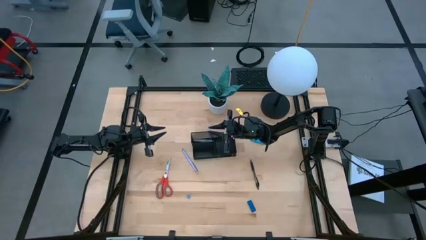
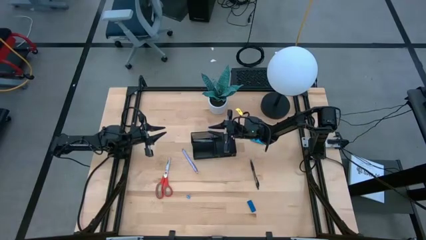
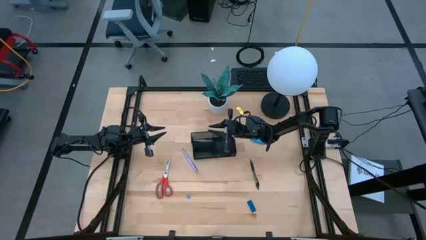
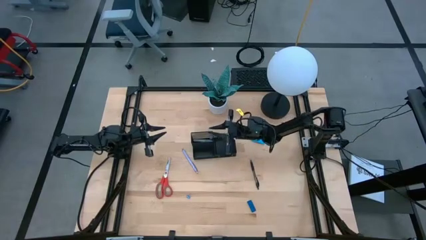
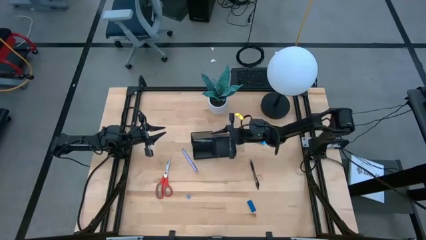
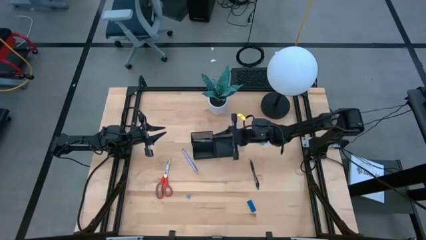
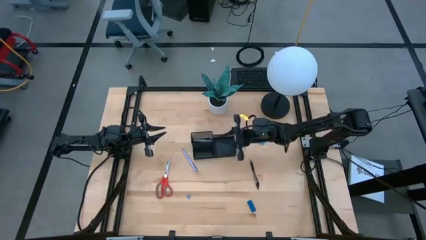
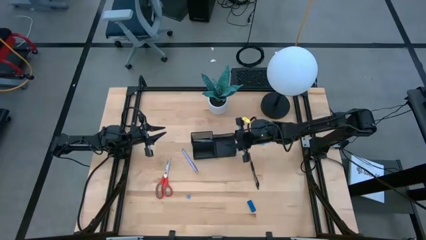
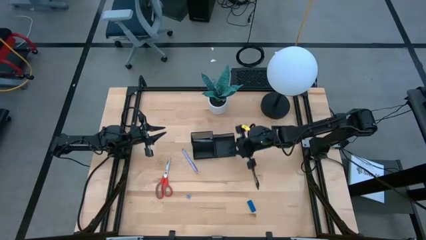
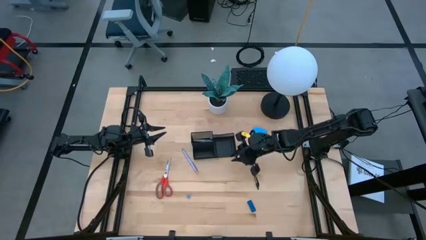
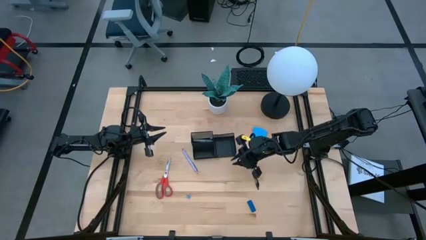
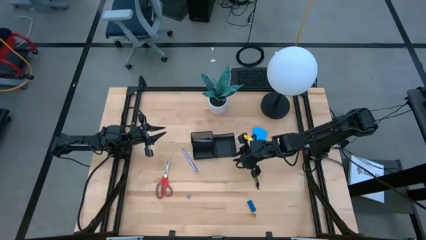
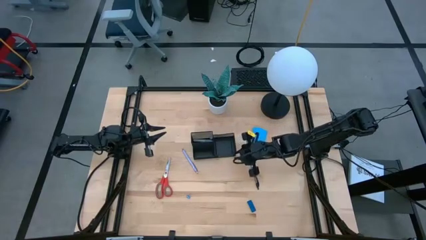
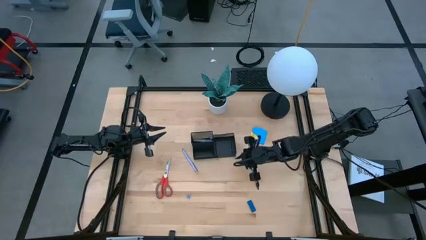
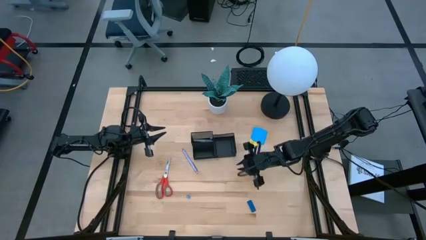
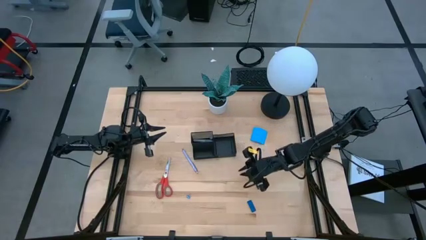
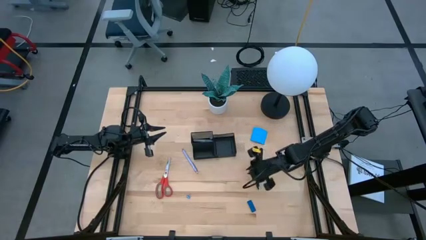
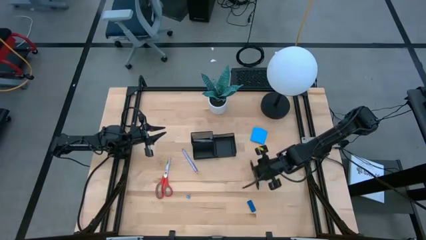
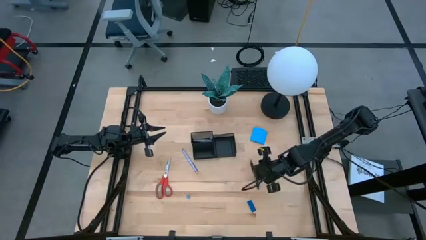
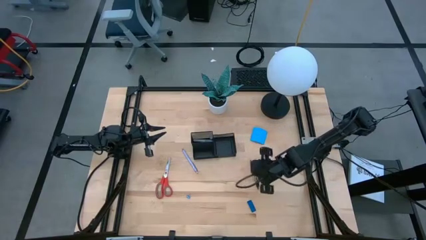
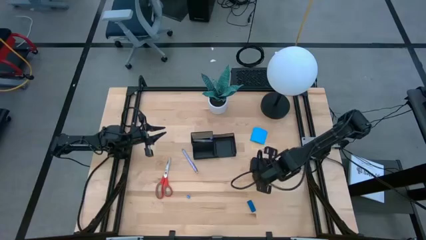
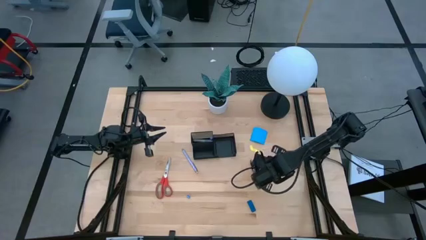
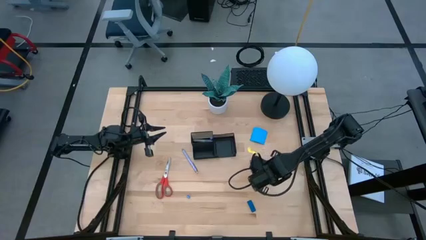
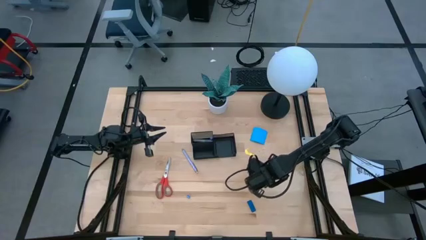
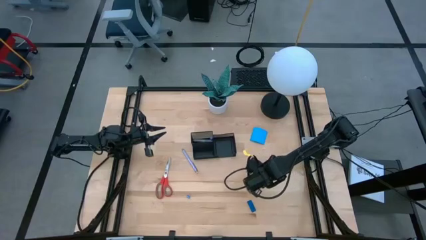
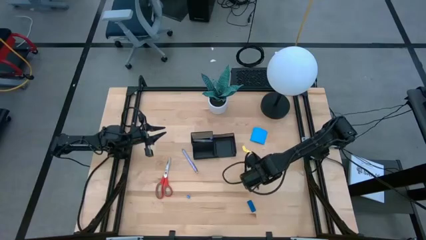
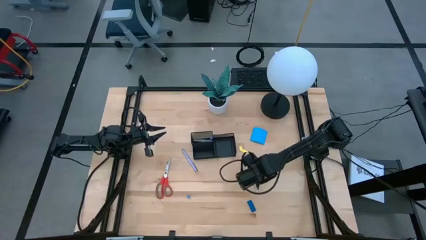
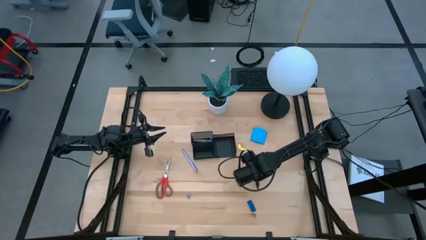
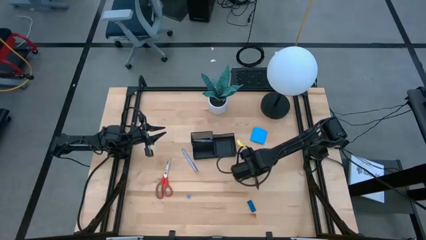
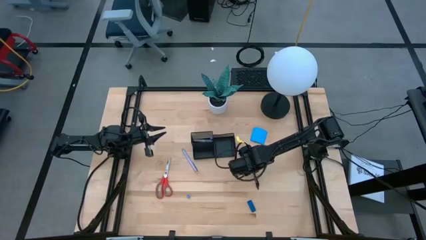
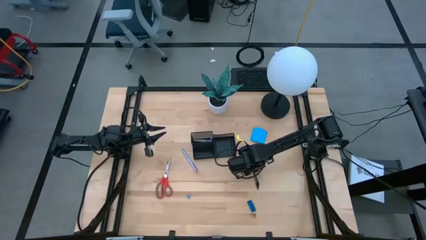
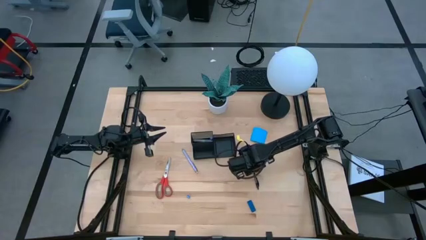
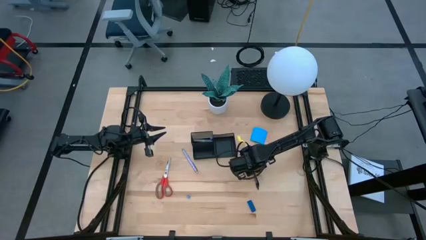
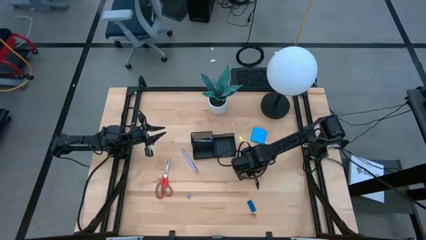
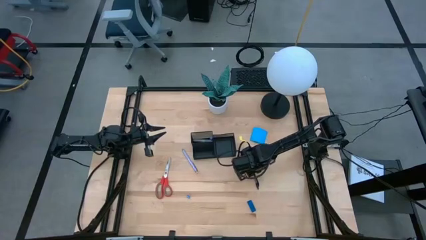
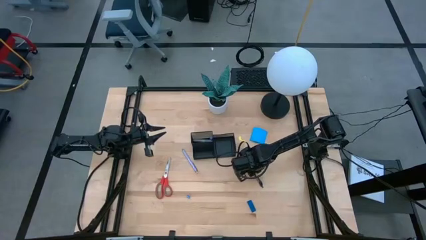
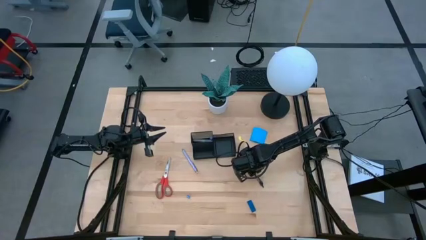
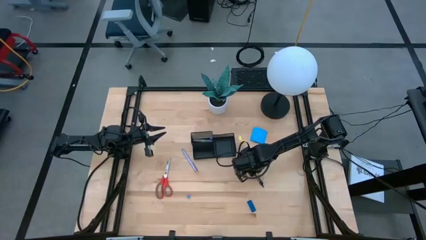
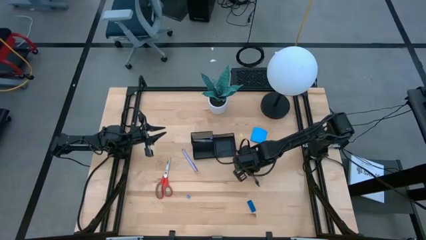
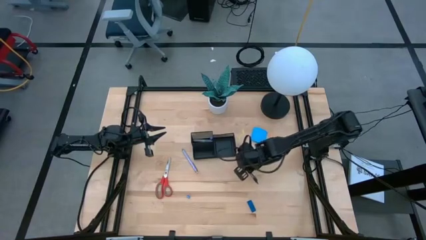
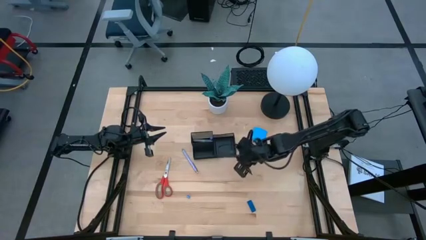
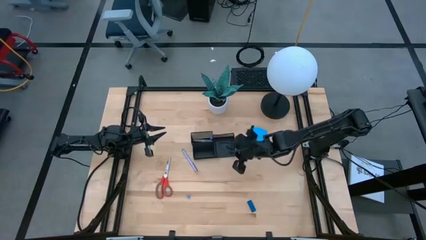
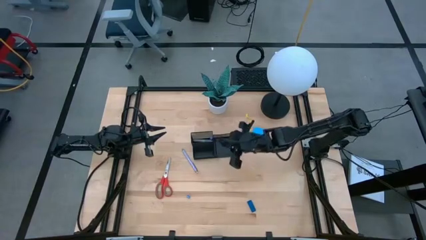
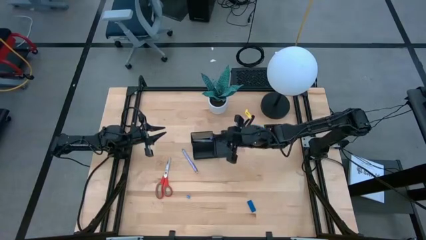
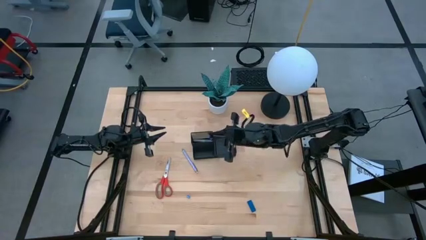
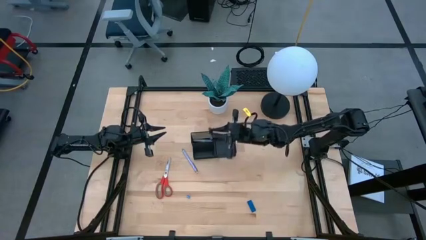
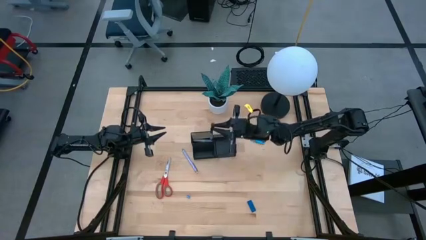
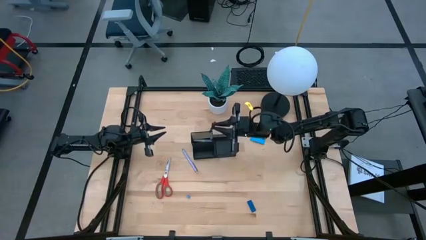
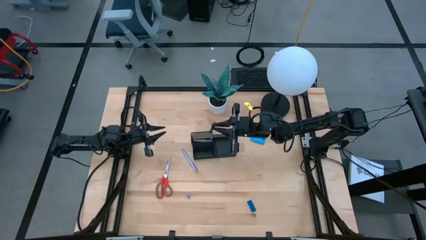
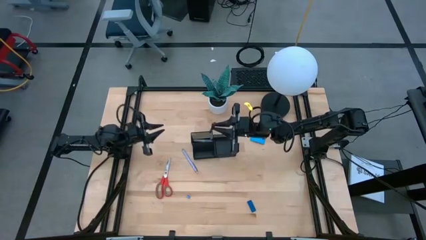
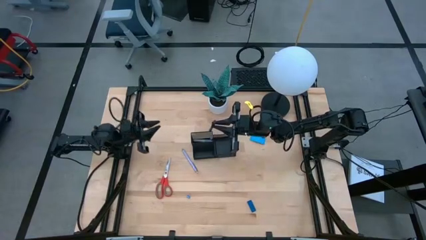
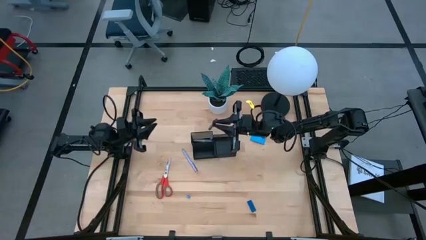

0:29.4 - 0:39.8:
Task: Pick and place office supplies into organizer
Put the black pen into the top left section of the desk organizer
